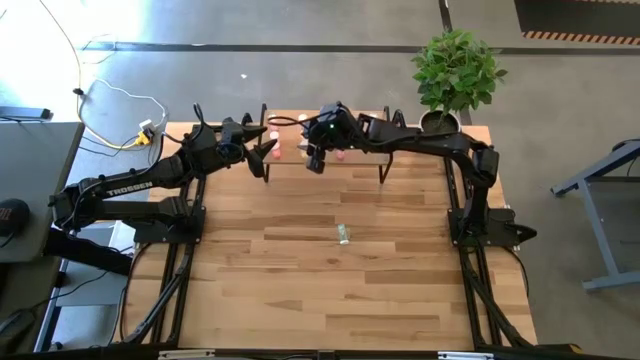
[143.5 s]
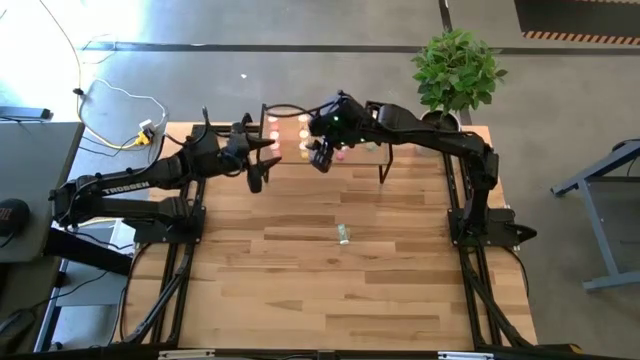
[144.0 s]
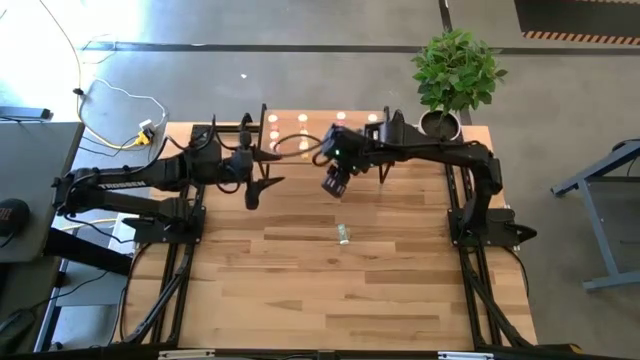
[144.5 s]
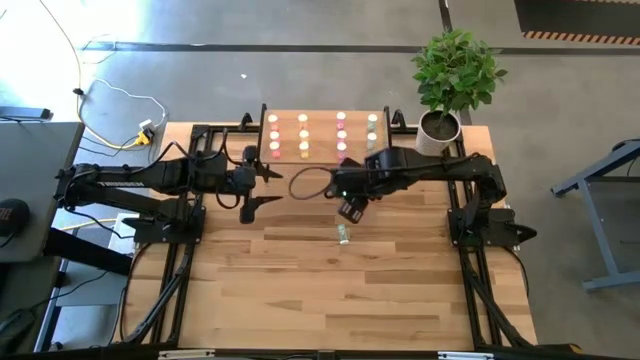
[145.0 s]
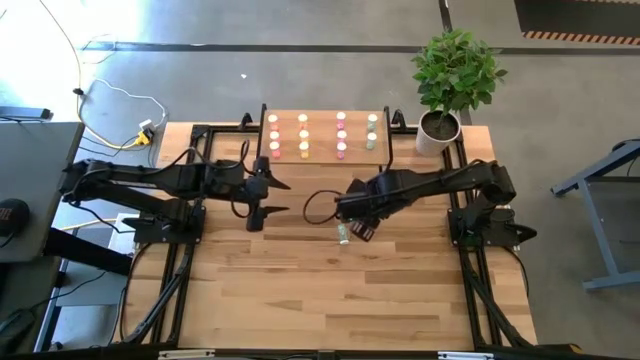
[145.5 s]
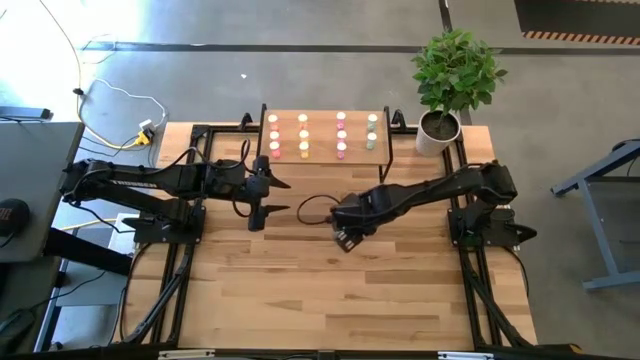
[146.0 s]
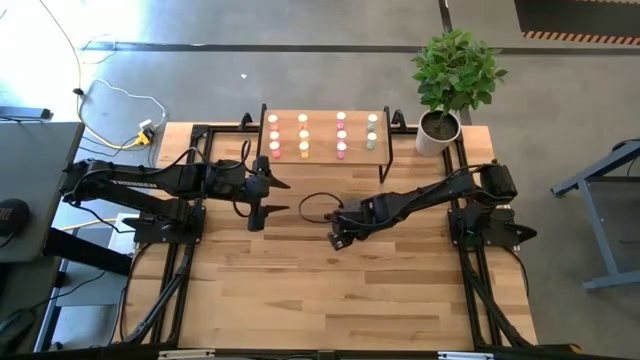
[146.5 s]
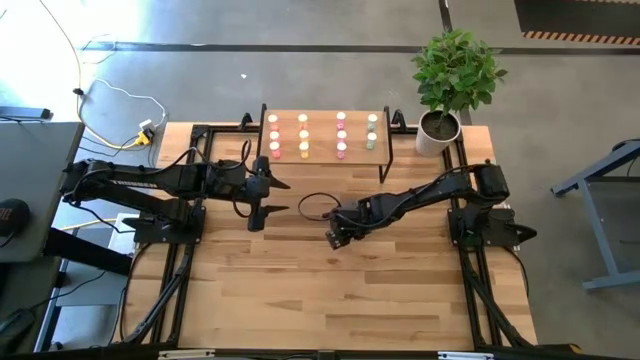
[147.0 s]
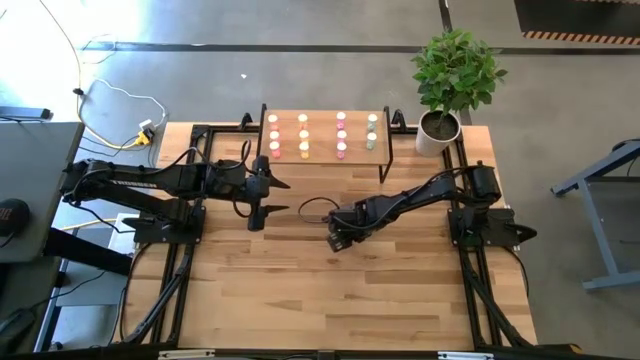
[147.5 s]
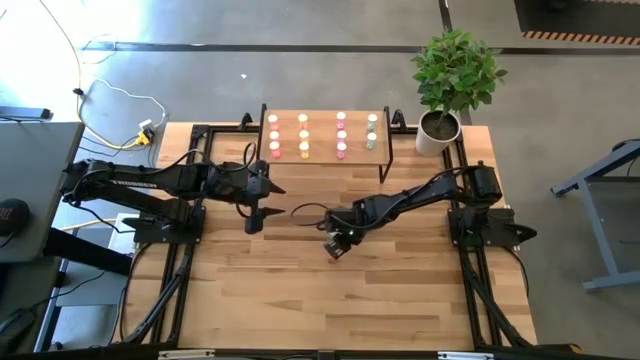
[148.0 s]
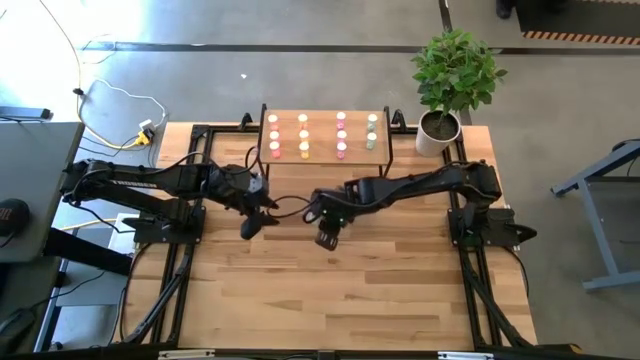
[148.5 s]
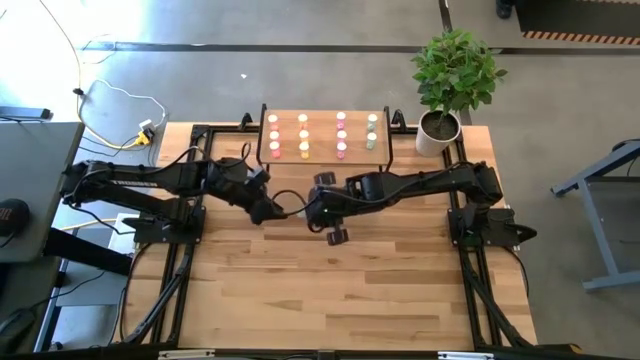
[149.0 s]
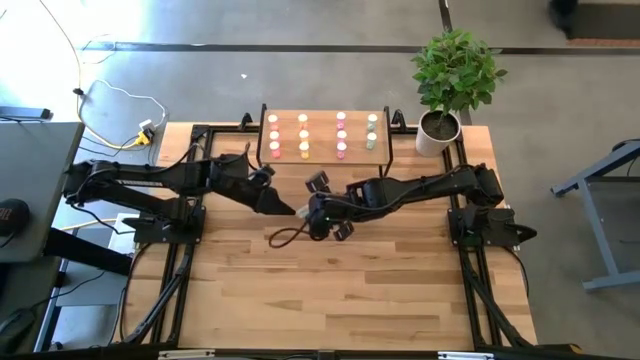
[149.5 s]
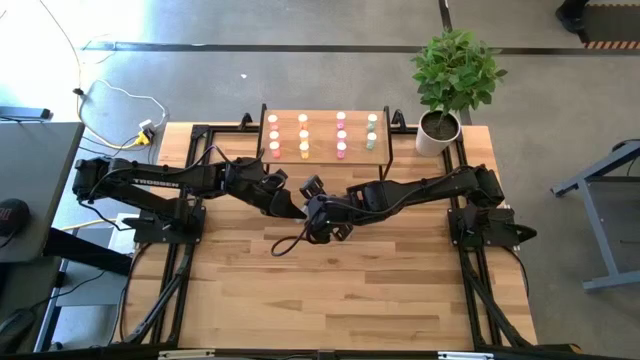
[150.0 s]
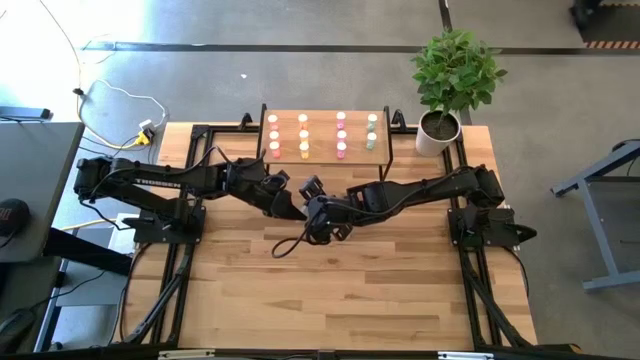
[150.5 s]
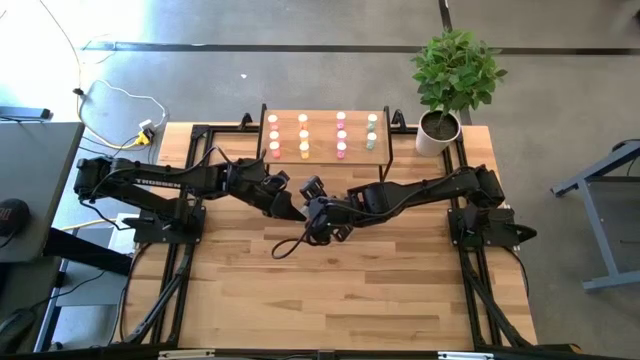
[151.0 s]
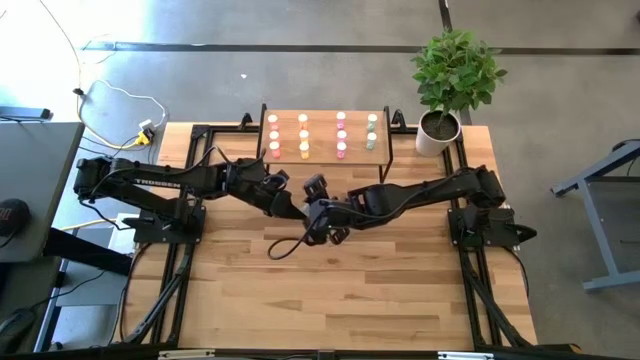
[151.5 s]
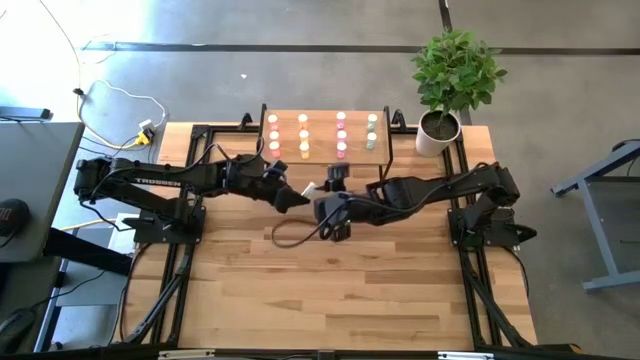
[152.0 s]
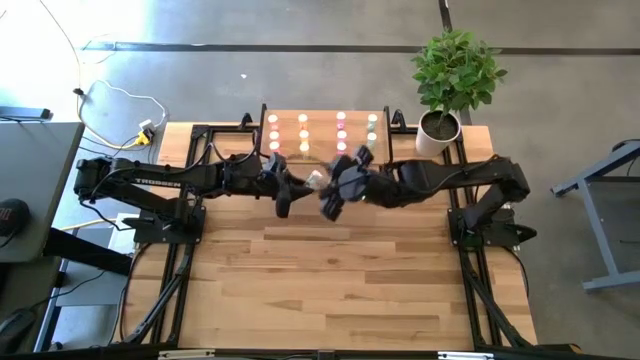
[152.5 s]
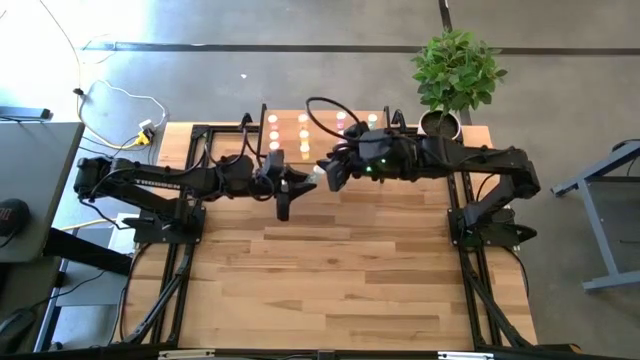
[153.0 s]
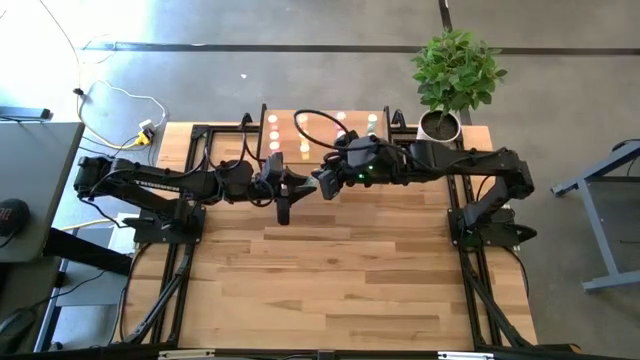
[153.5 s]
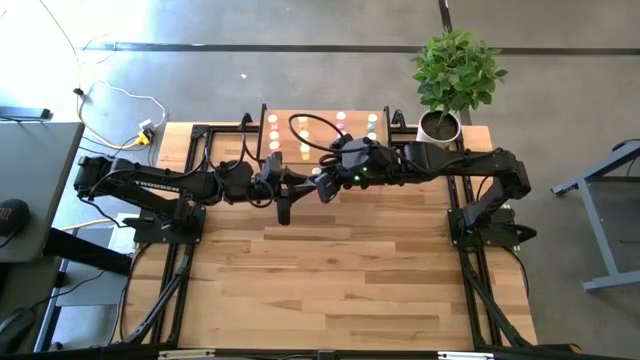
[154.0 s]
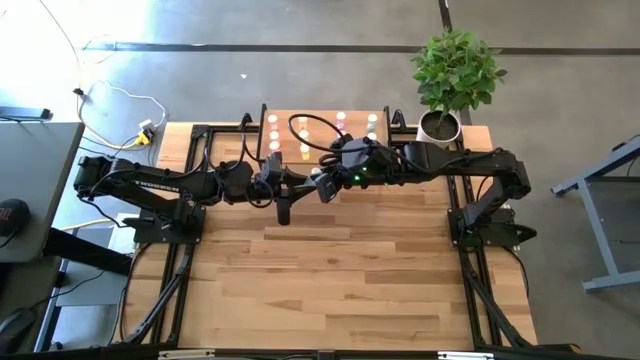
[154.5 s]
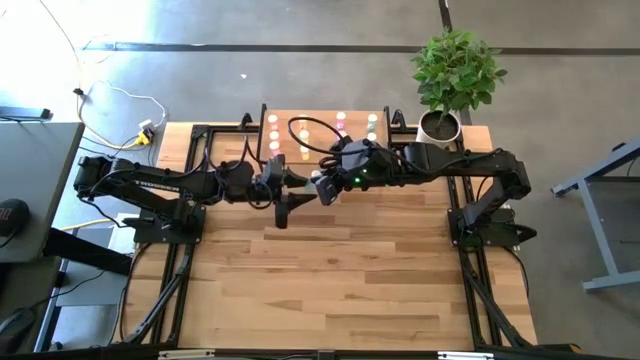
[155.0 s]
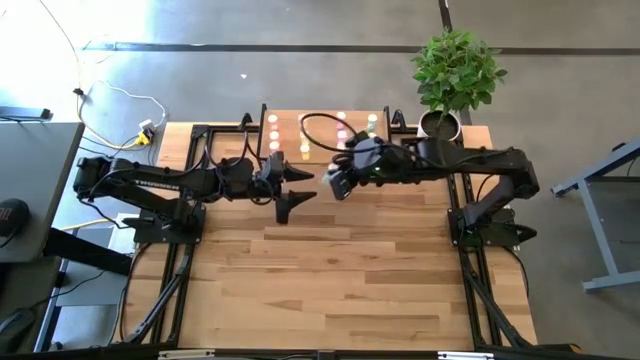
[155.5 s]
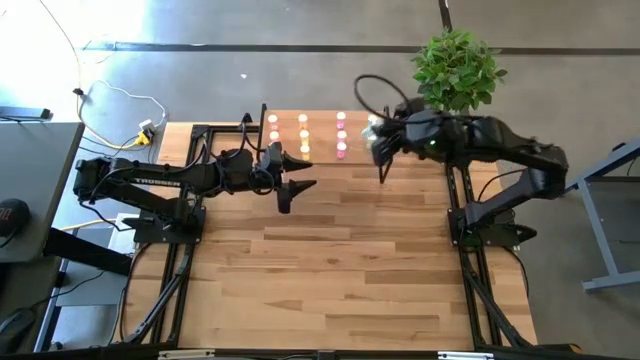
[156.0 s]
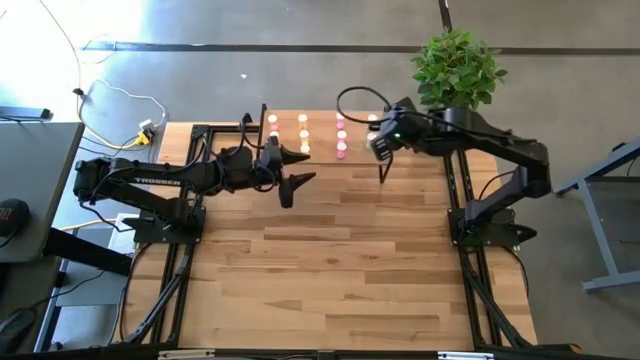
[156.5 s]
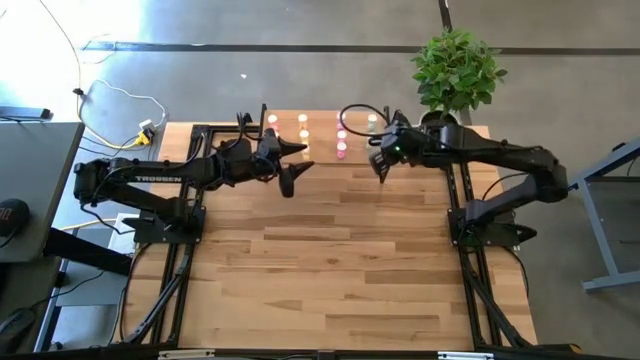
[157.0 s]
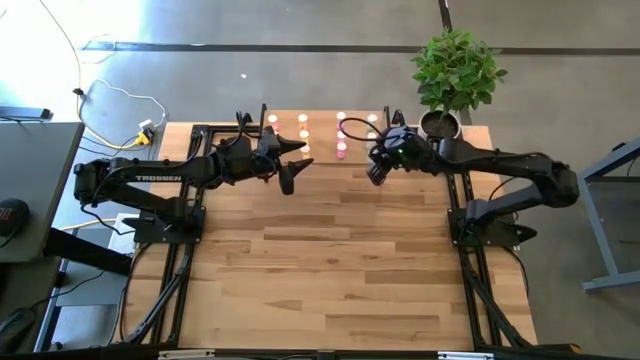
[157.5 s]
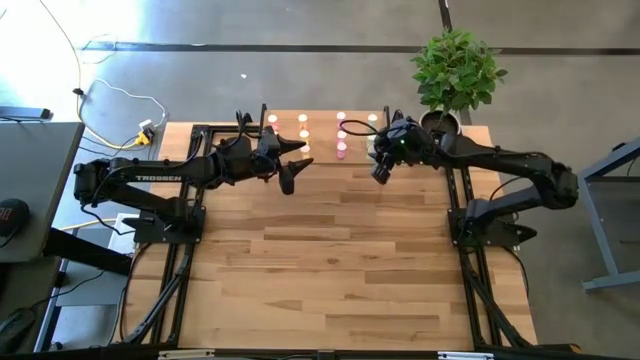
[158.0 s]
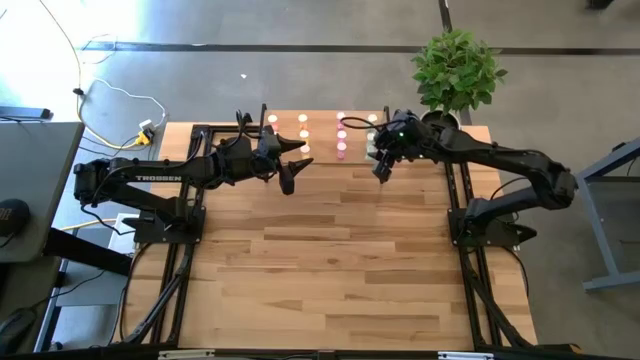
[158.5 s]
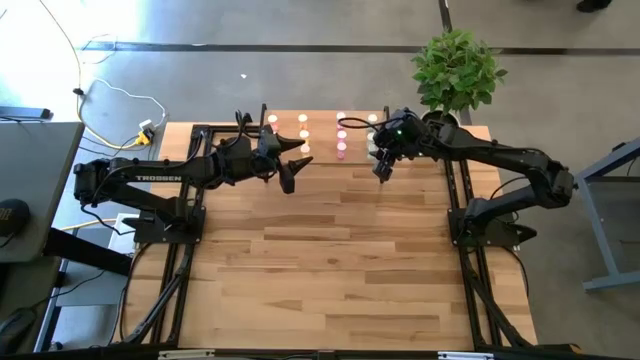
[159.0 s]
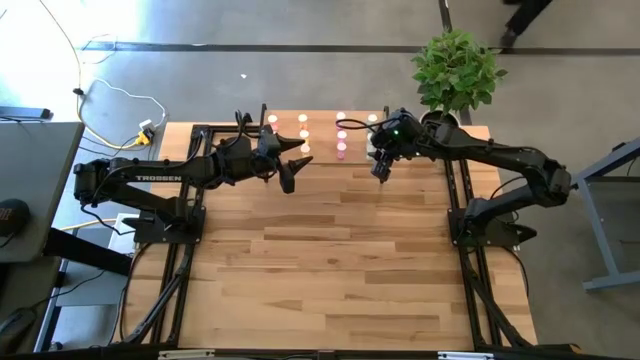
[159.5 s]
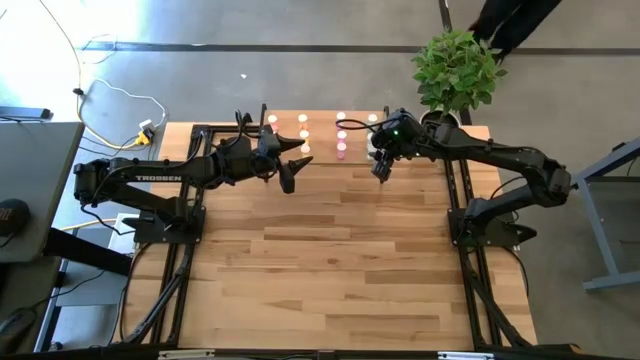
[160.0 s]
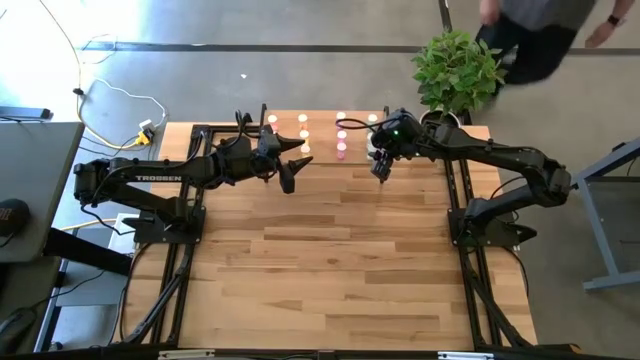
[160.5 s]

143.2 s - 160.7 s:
Task: Pick and place medicine bottles onto shelf by color
Put the blue pill bottle on the shelf aligned with the other blue pill bottles

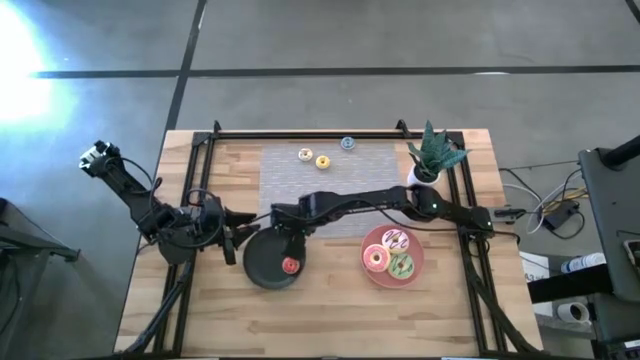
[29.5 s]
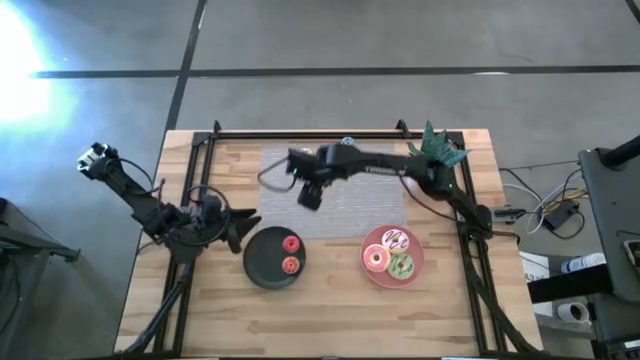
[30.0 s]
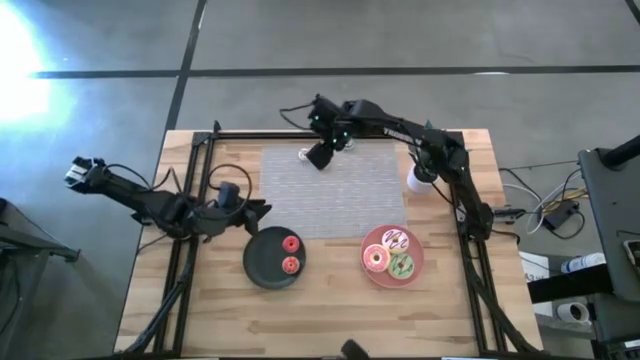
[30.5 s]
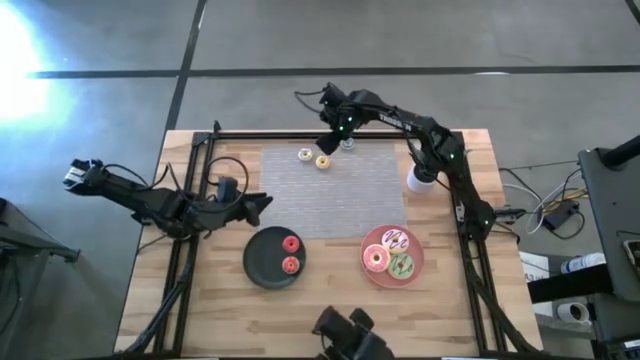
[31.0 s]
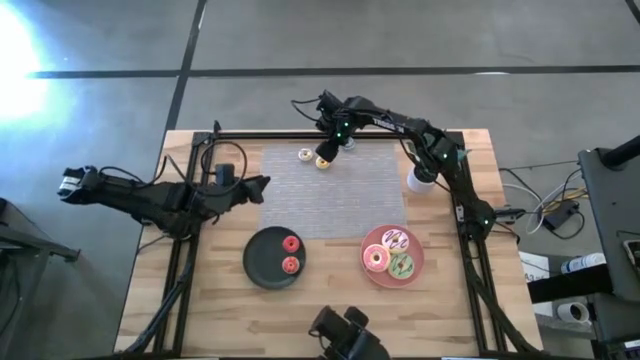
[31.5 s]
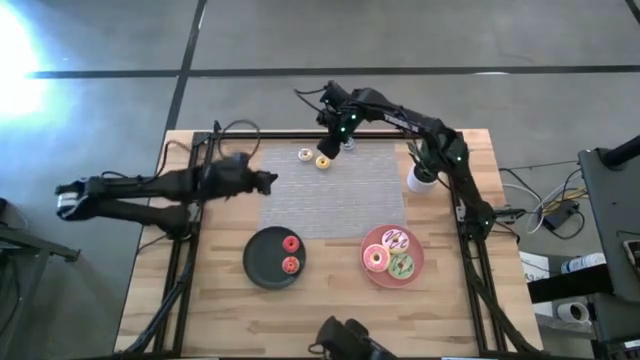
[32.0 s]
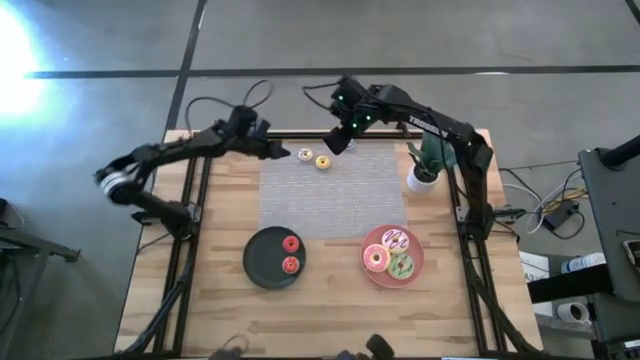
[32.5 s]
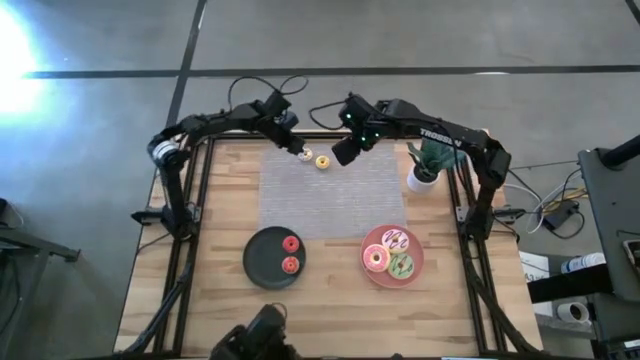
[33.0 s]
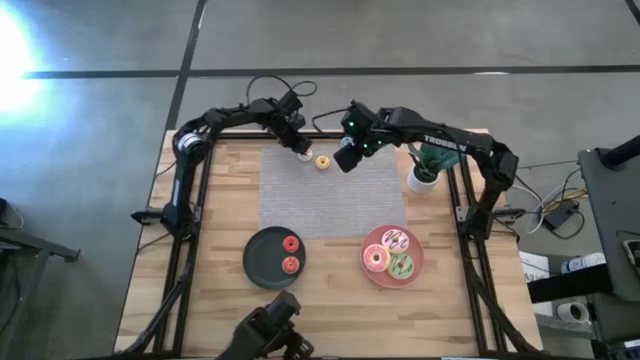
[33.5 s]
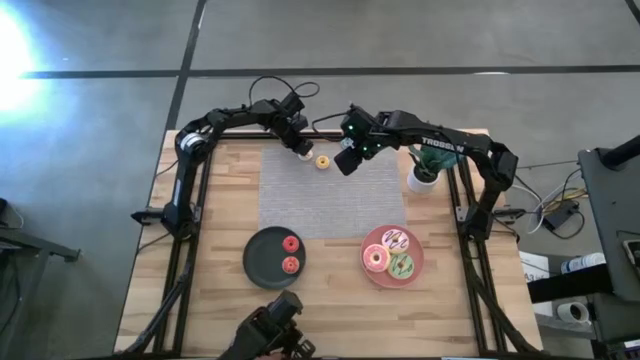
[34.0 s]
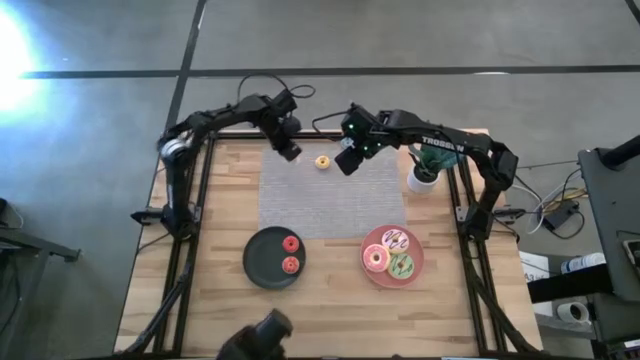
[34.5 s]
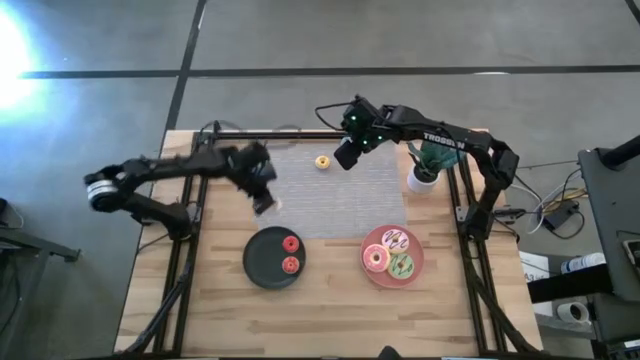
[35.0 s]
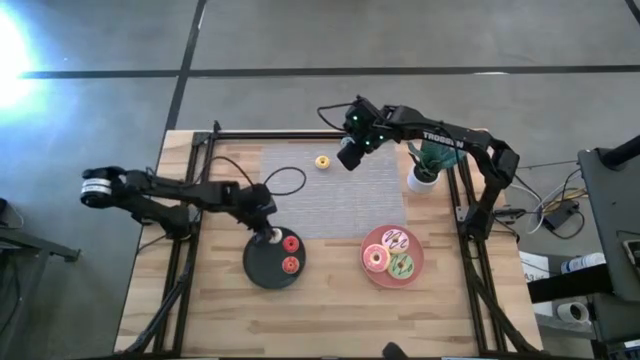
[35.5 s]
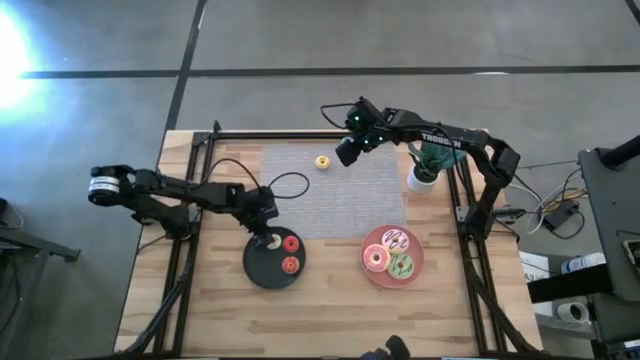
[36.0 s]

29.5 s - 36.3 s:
Task: Pick & Place donuts
Put the small white donut on the black plate
